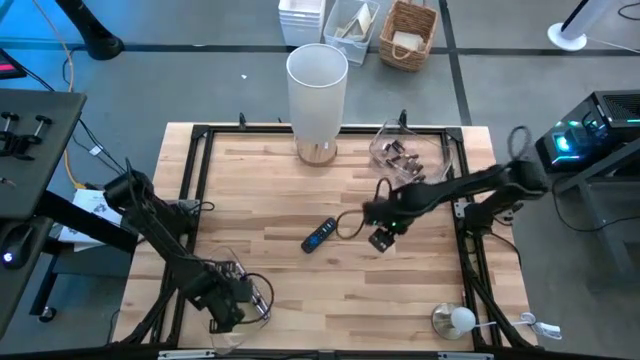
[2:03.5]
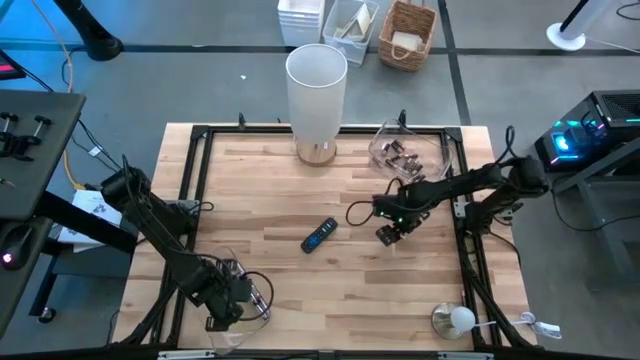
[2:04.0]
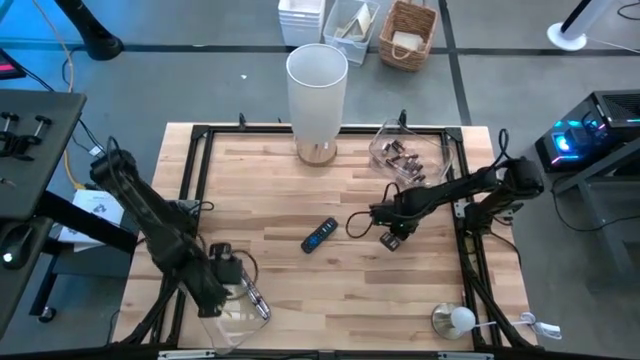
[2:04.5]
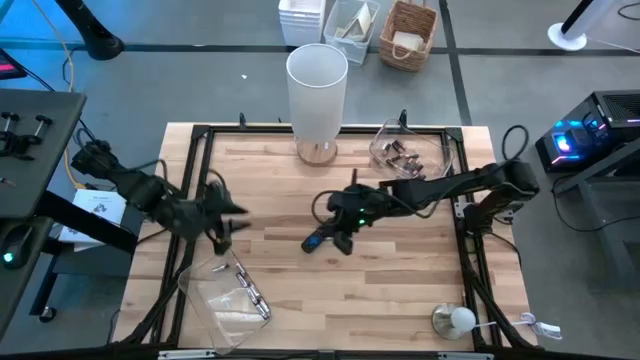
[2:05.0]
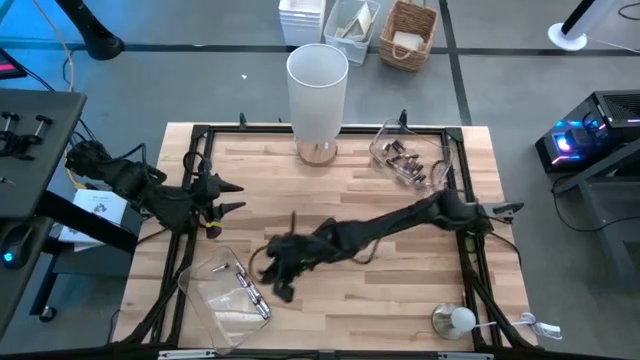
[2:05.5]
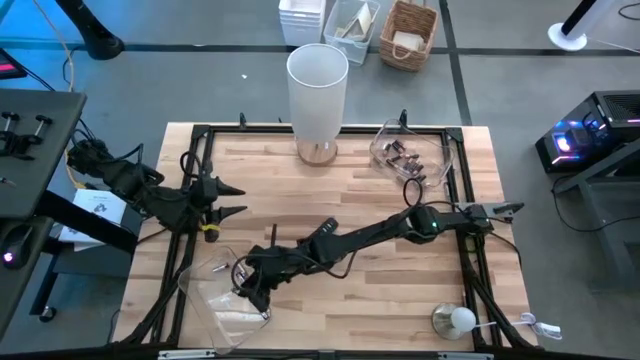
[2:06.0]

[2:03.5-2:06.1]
Task: Sort batteries
Put the silver battery into the bottom transparent bin

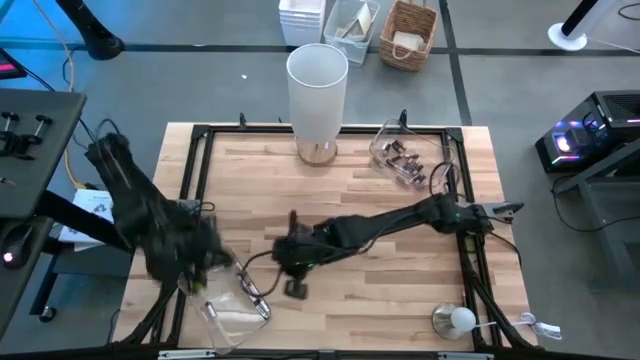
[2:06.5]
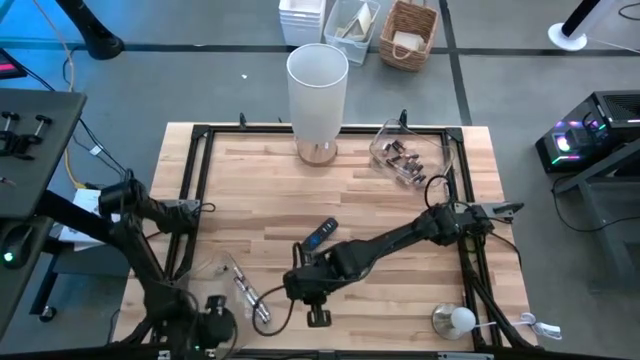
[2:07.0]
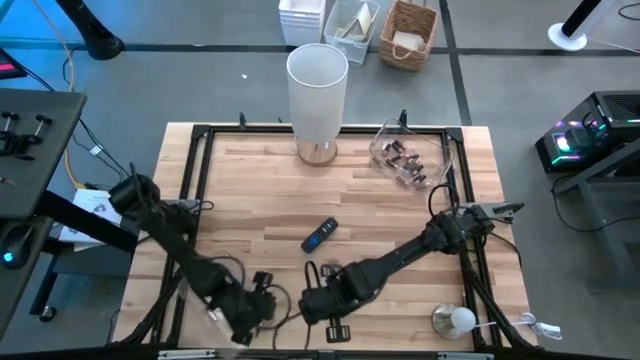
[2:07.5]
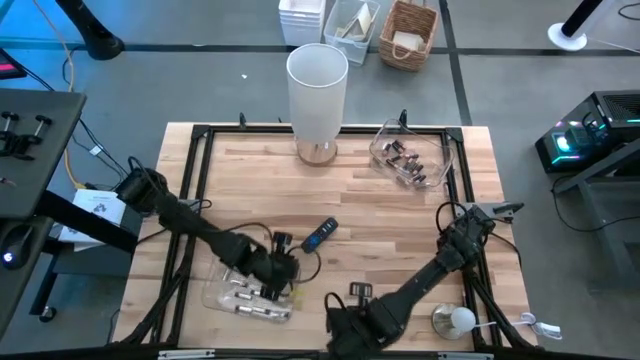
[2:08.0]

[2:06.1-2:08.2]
Adjust the bottom transparent bin

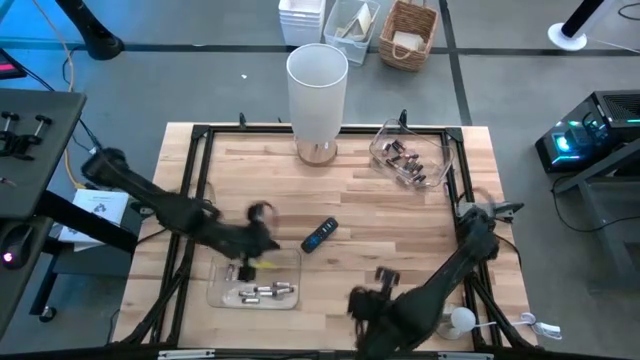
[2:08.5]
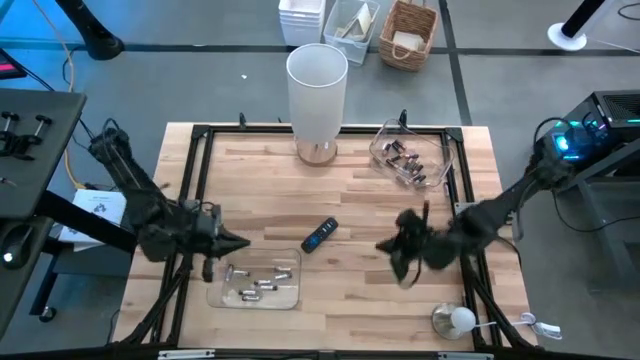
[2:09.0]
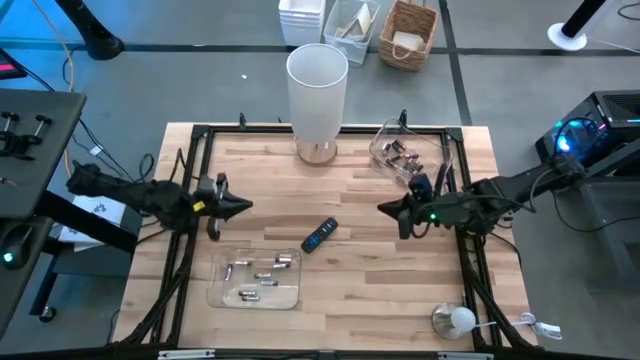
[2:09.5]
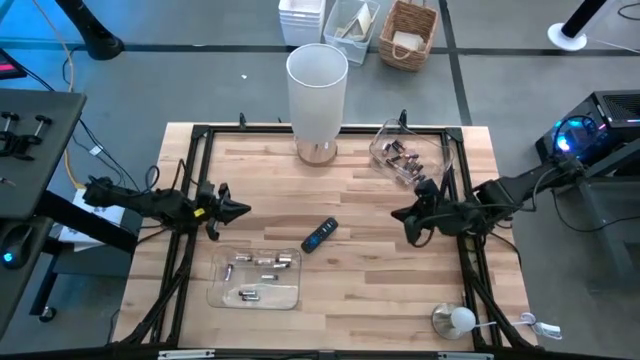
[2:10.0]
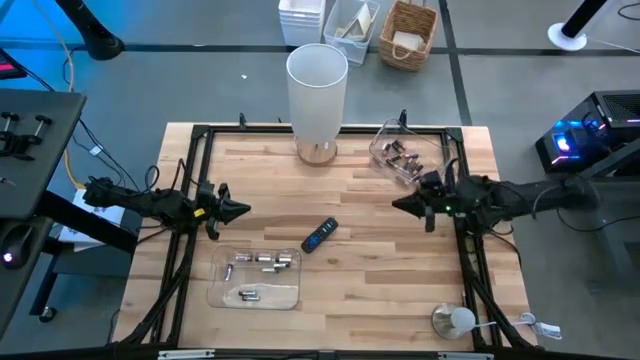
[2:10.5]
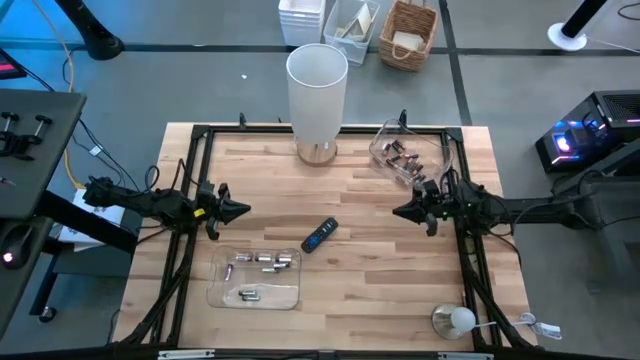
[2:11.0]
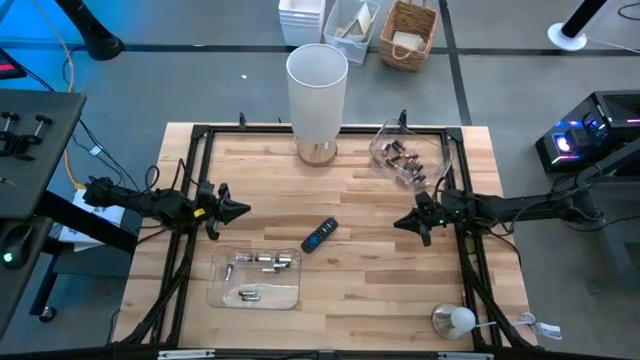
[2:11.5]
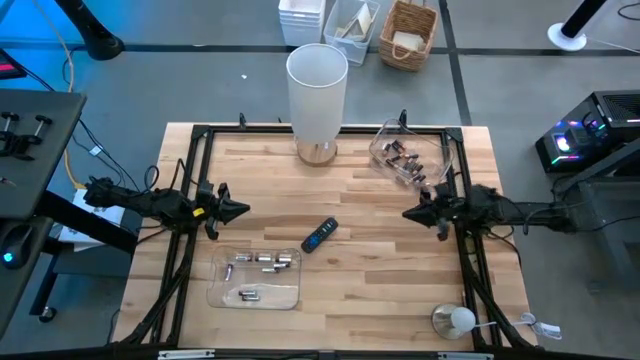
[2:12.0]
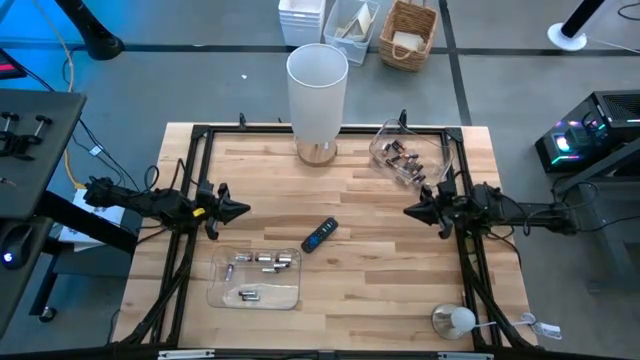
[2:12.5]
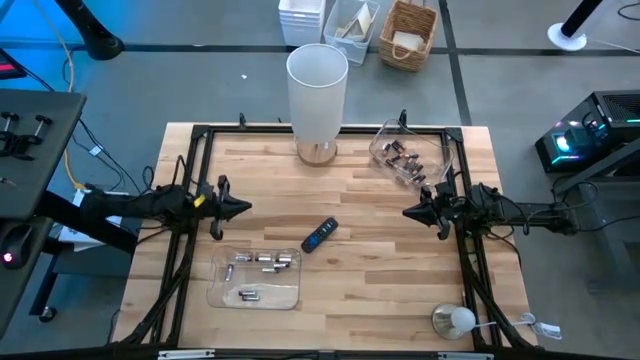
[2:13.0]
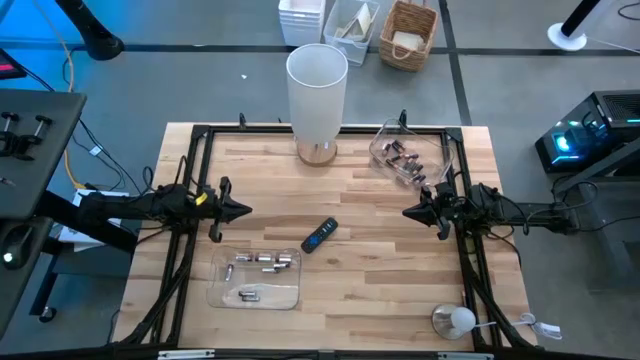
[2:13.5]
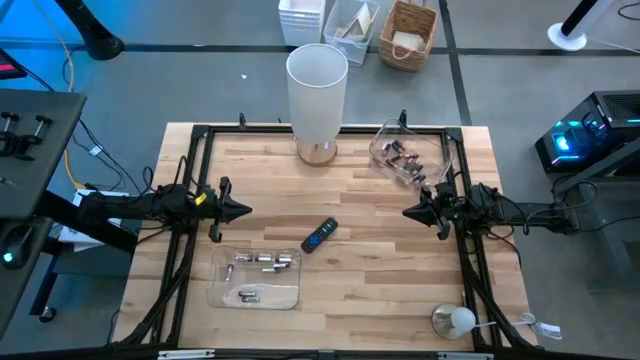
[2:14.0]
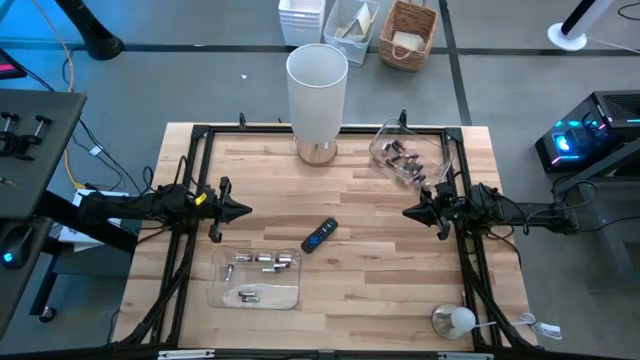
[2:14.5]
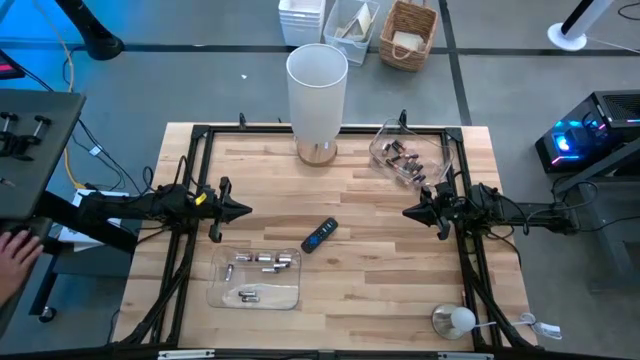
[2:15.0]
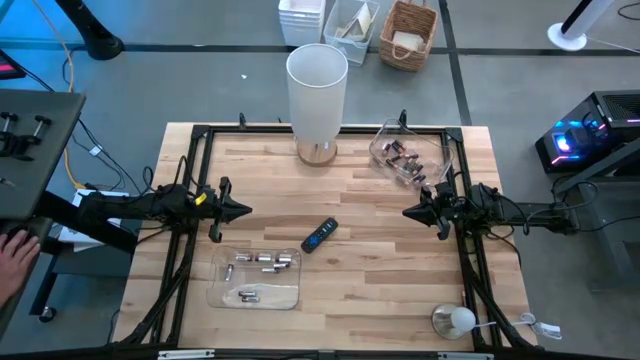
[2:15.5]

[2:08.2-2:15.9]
Return to Home Position

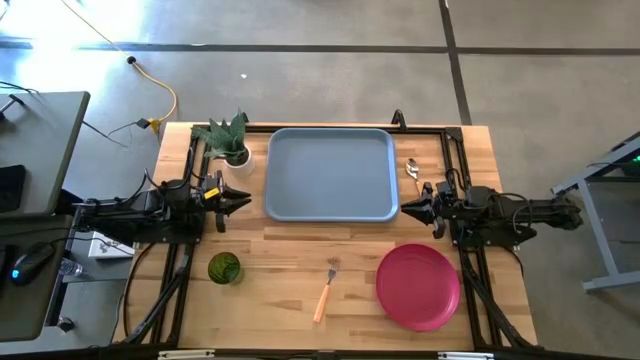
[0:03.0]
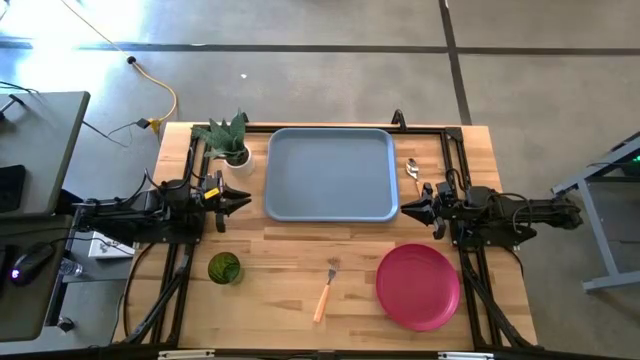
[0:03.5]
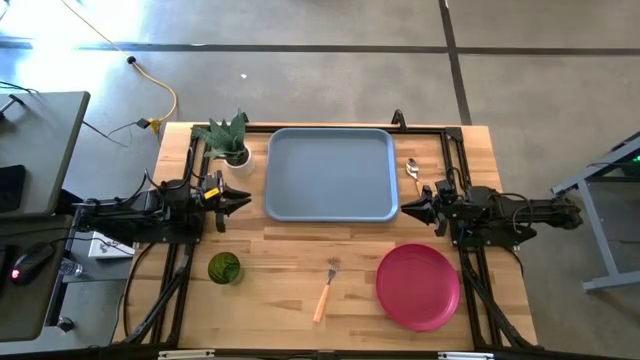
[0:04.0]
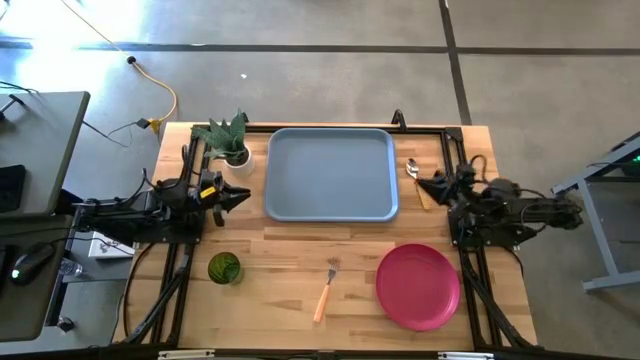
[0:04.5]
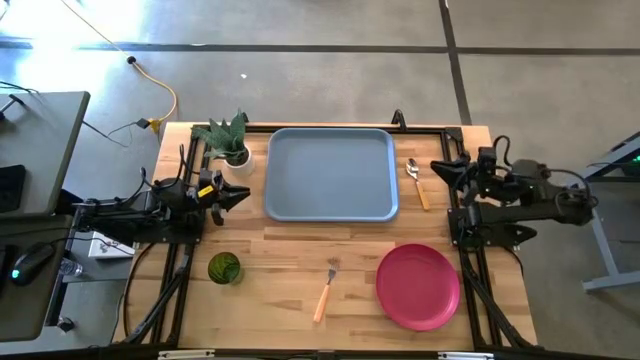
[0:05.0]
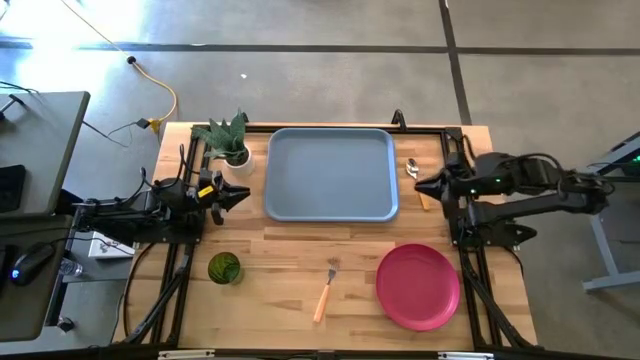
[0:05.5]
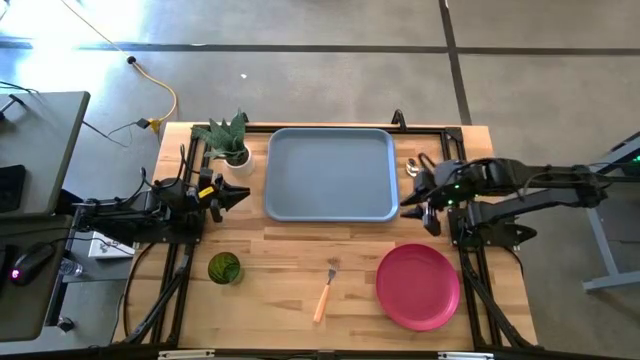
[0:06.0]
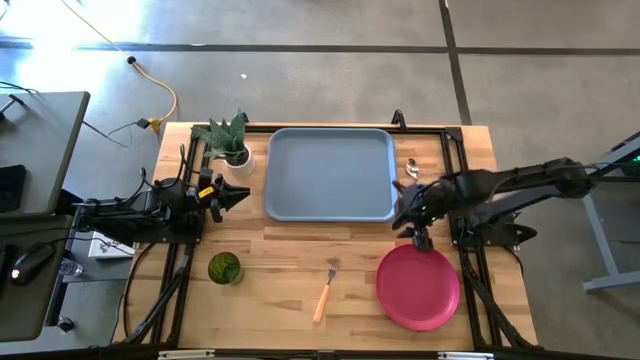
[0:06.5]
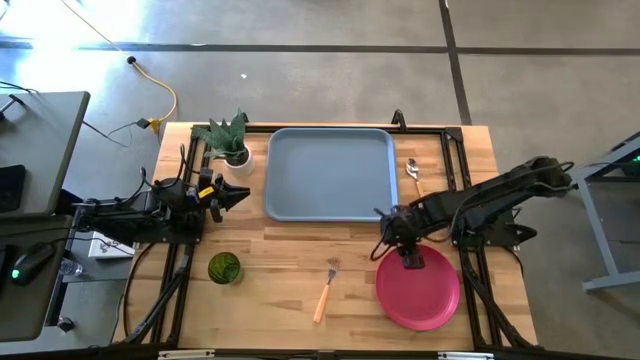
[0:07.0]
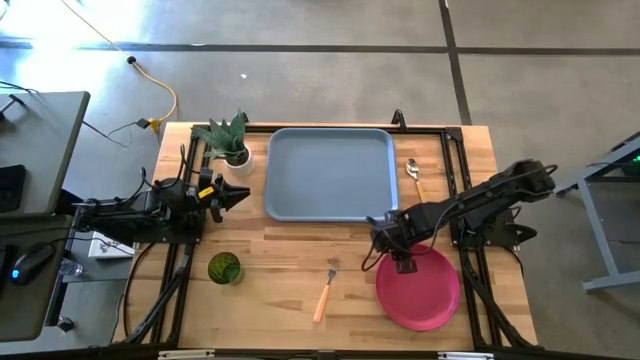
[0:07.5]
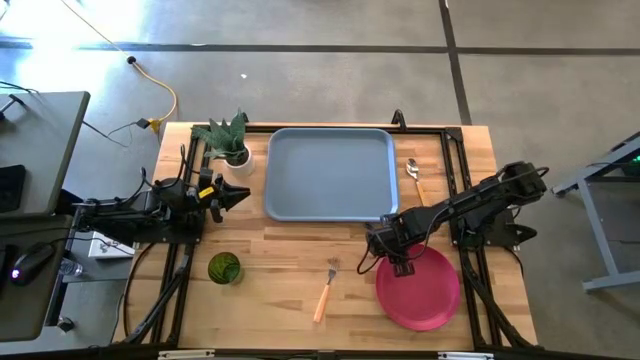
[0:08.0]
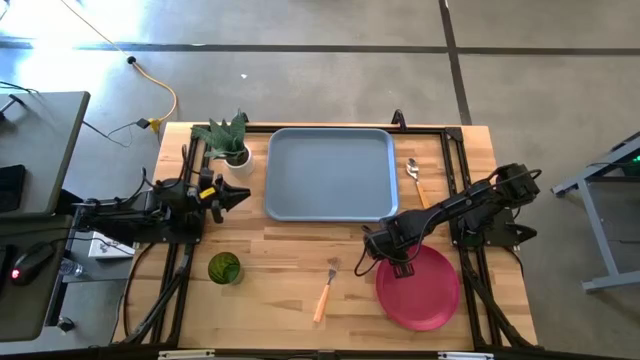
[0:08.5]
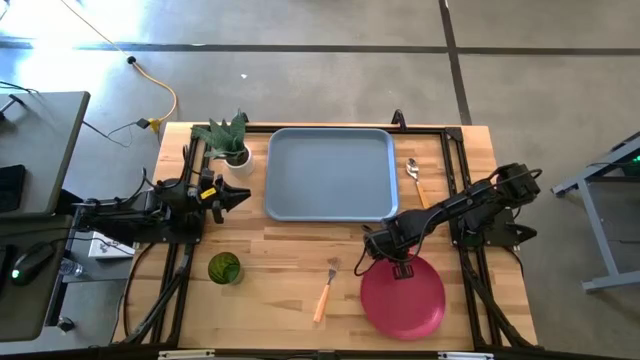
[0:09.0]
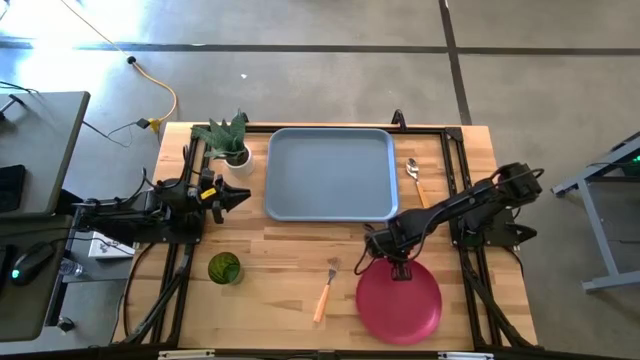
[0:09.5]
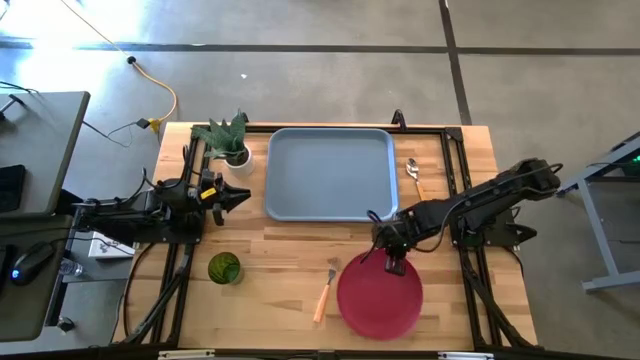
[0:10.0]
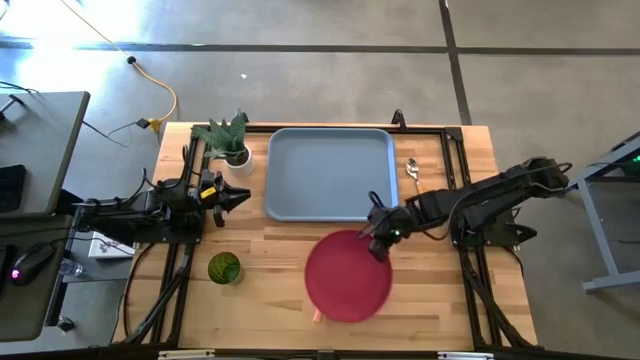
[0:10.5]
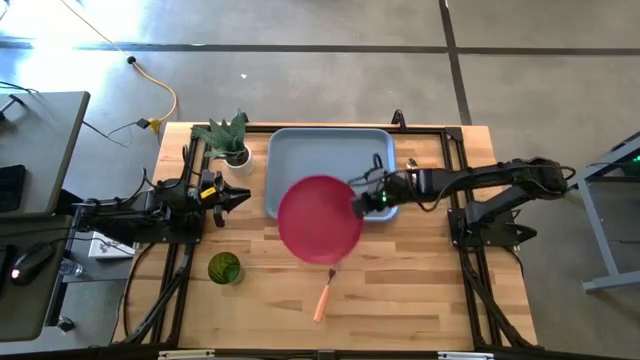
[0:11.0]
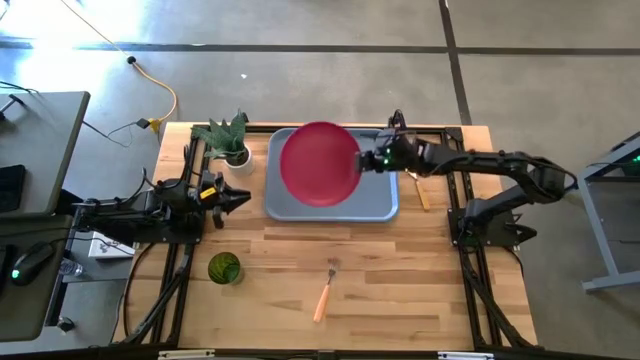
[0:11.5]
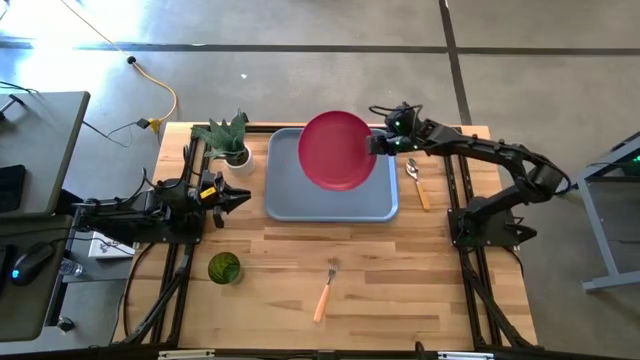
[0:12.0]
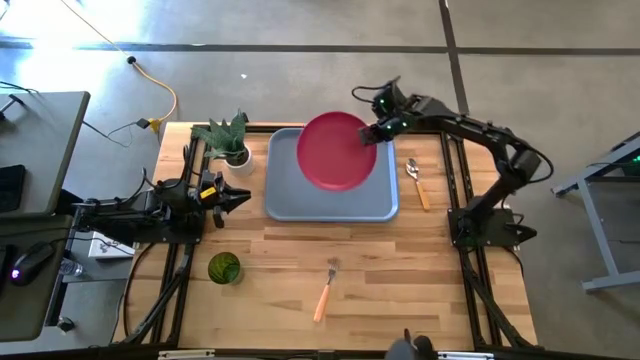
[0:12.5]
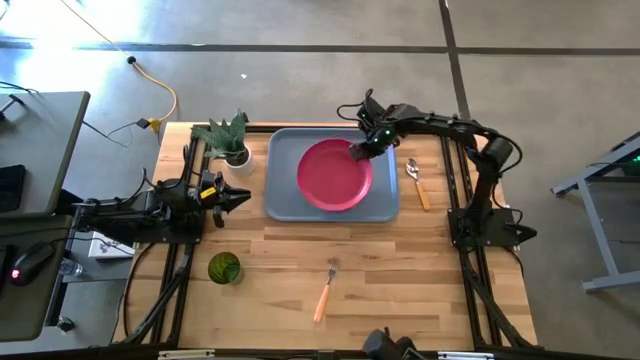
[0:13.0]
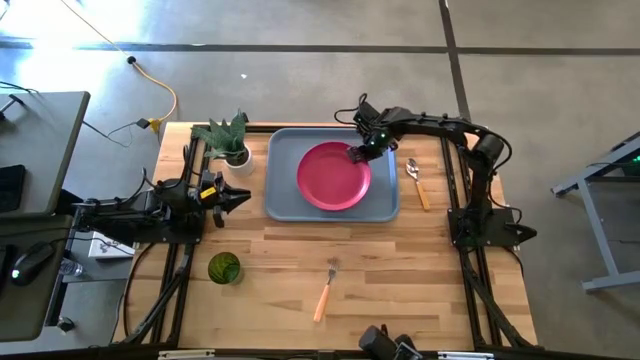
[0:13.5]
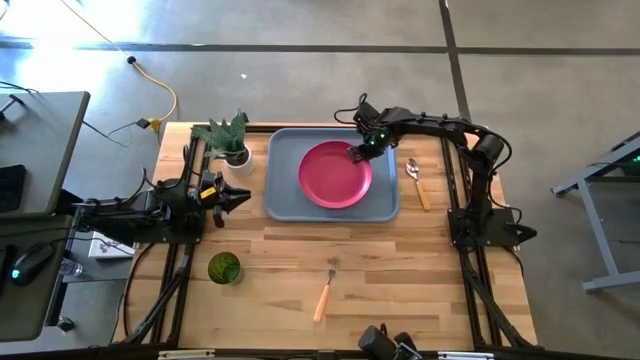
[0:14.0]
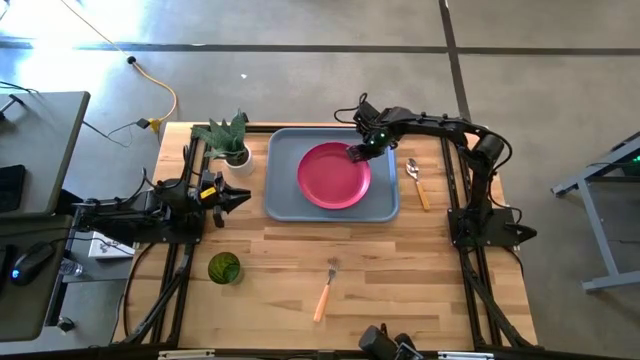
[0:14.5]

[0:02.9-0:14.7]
Task: Pick and place plate/cup/fork/spoon on tray
Put the pink plate on the gray tray
